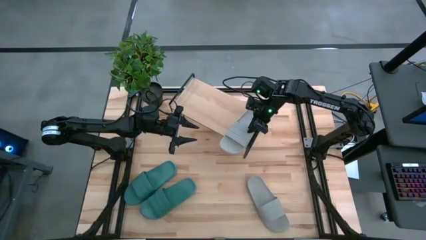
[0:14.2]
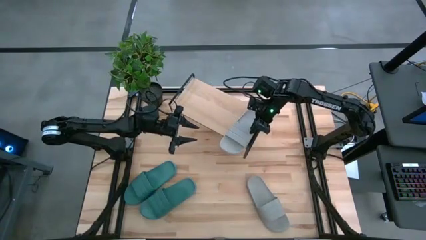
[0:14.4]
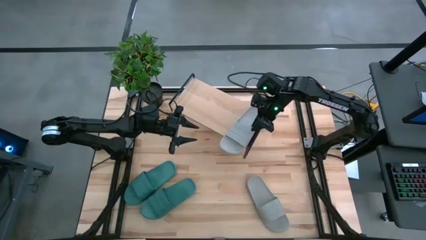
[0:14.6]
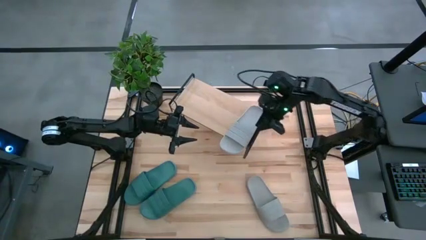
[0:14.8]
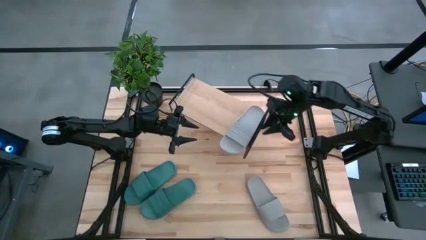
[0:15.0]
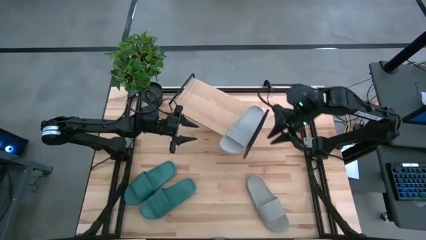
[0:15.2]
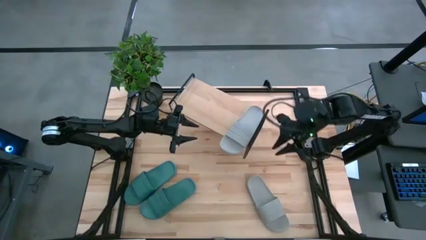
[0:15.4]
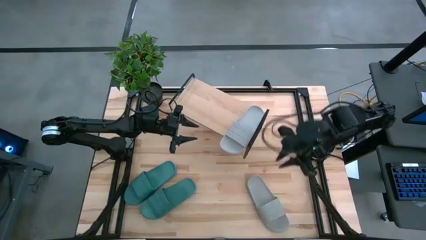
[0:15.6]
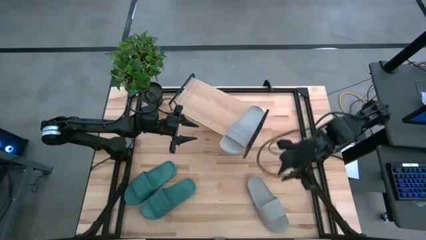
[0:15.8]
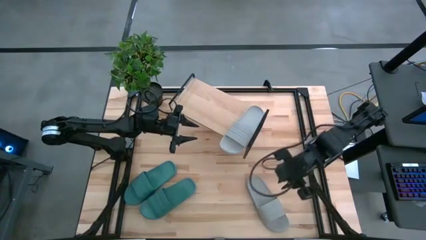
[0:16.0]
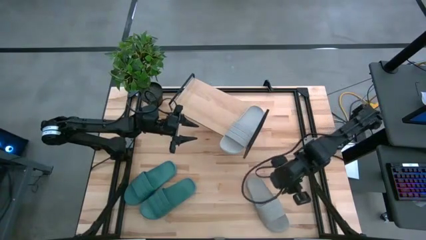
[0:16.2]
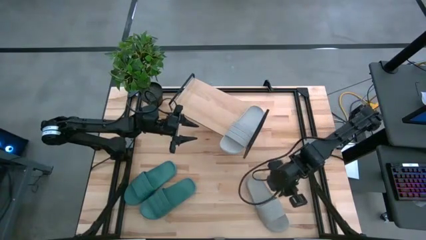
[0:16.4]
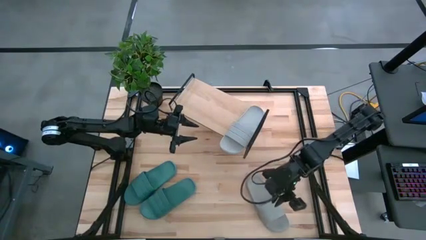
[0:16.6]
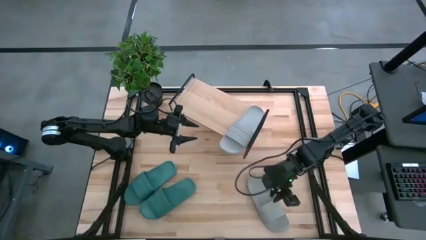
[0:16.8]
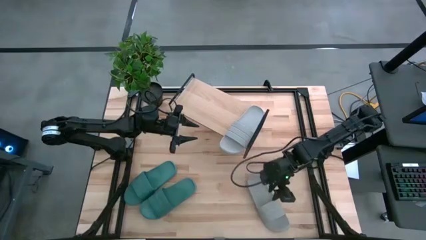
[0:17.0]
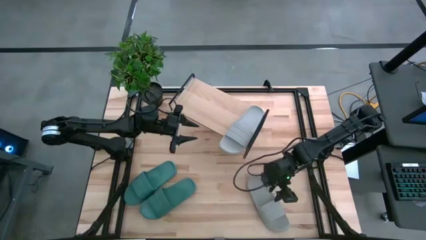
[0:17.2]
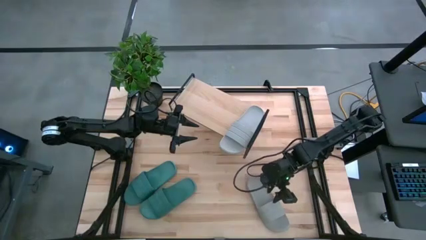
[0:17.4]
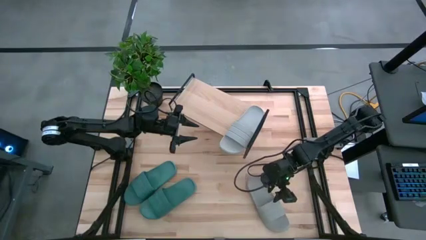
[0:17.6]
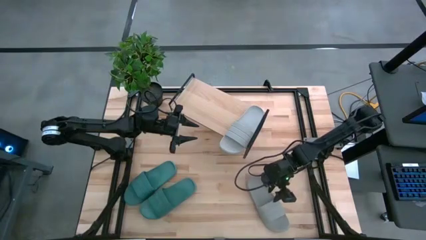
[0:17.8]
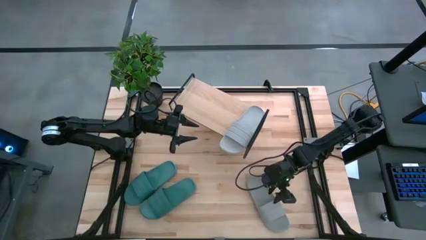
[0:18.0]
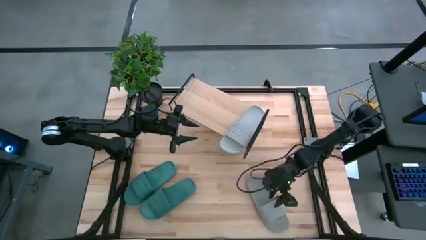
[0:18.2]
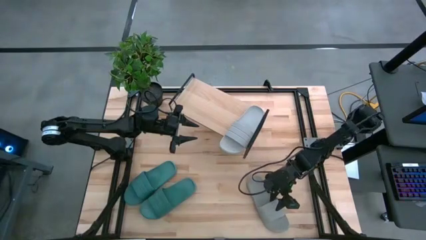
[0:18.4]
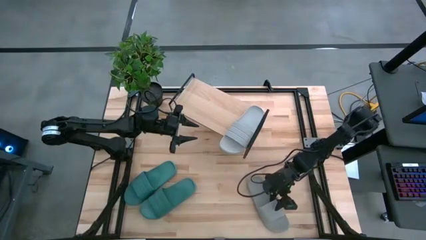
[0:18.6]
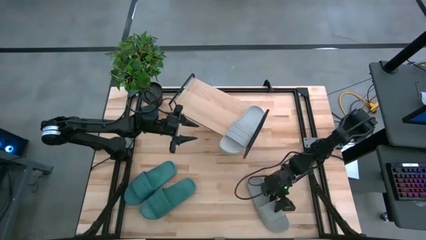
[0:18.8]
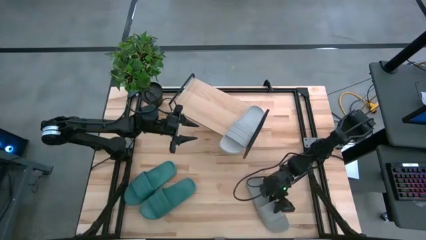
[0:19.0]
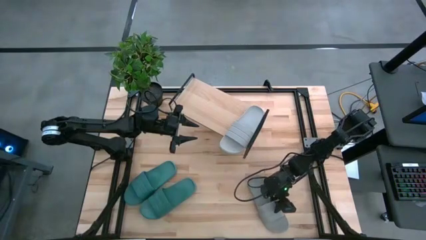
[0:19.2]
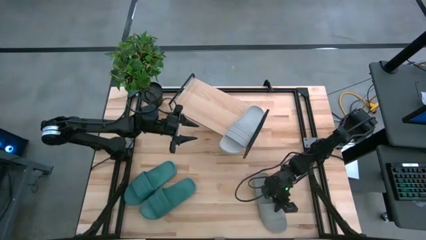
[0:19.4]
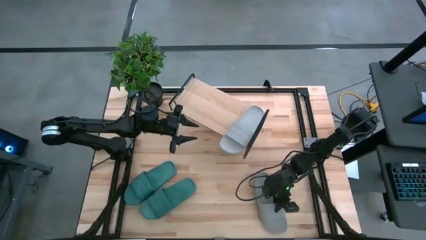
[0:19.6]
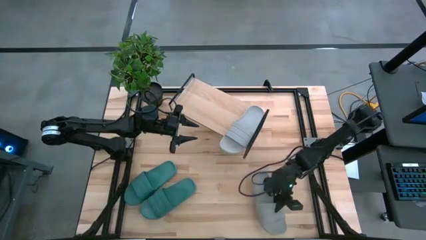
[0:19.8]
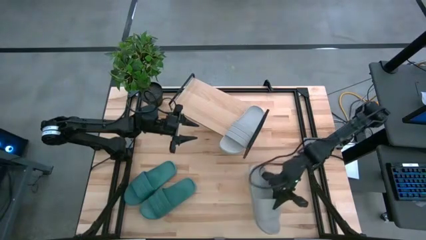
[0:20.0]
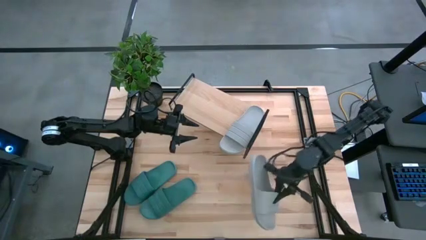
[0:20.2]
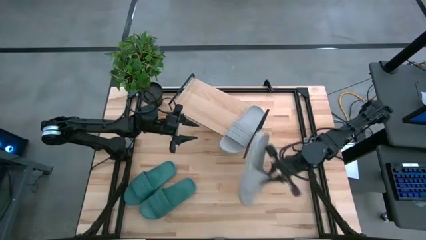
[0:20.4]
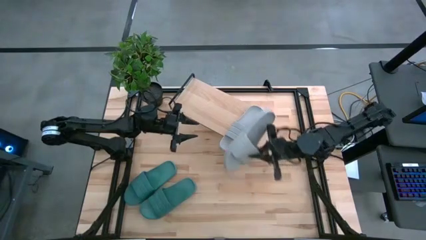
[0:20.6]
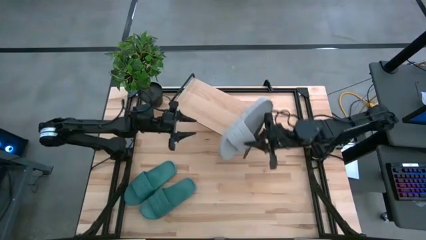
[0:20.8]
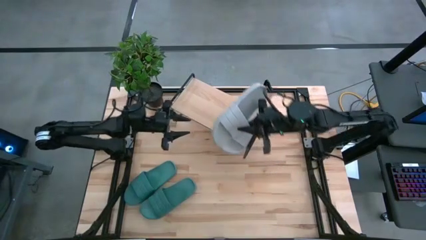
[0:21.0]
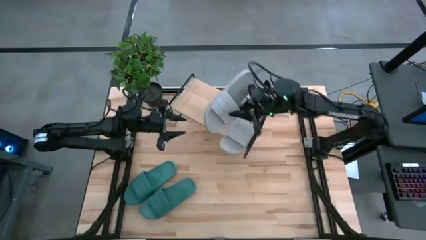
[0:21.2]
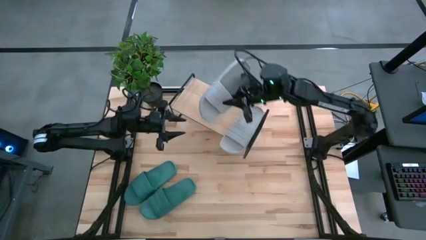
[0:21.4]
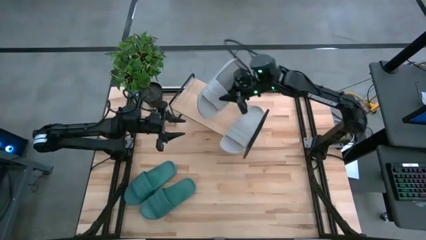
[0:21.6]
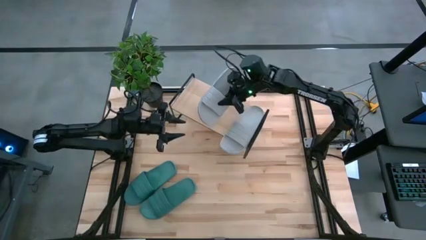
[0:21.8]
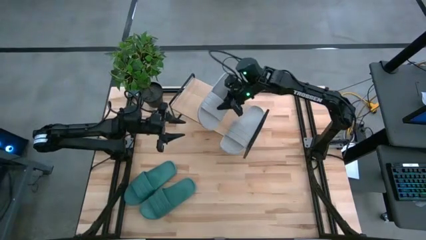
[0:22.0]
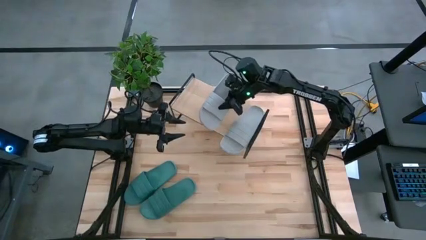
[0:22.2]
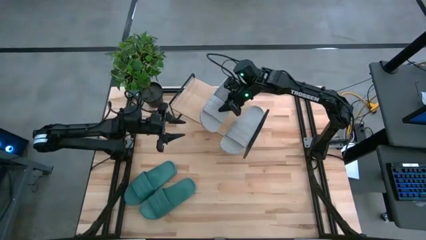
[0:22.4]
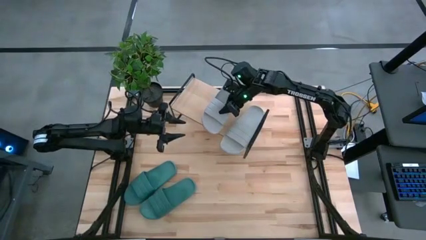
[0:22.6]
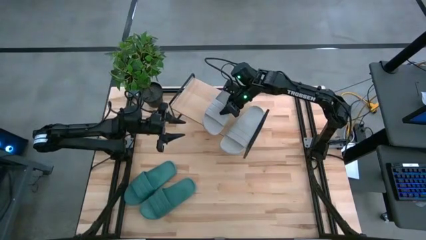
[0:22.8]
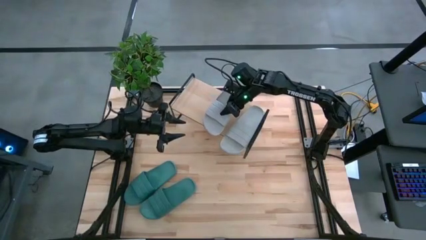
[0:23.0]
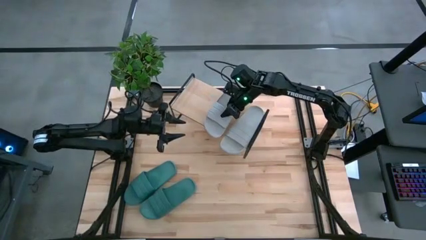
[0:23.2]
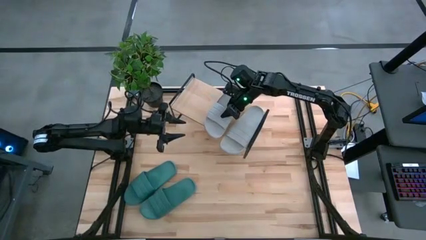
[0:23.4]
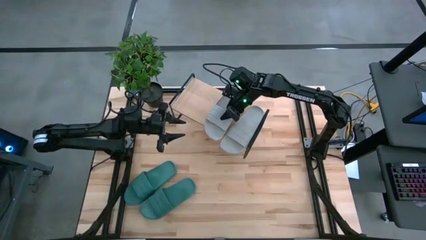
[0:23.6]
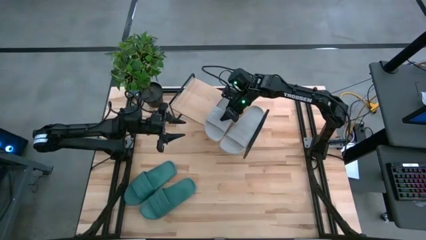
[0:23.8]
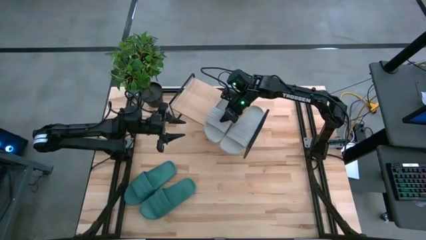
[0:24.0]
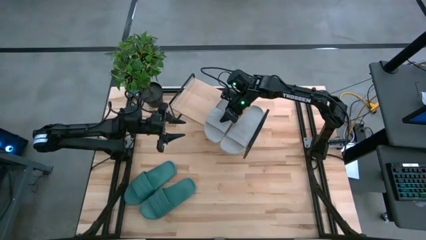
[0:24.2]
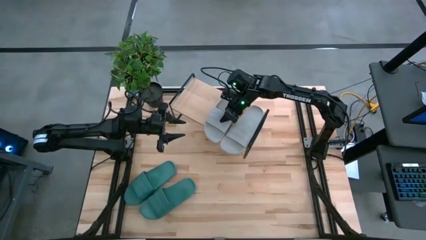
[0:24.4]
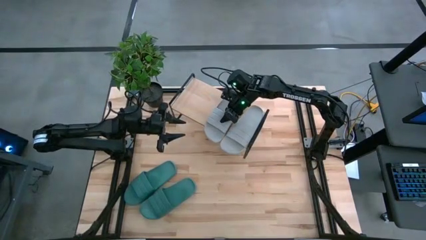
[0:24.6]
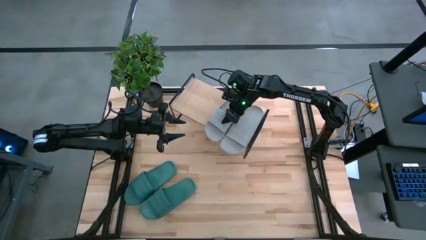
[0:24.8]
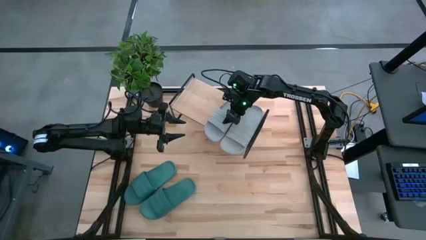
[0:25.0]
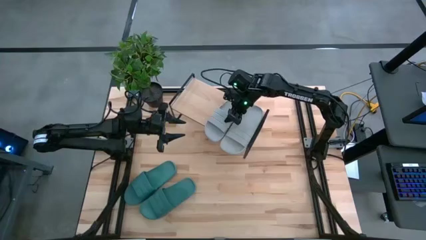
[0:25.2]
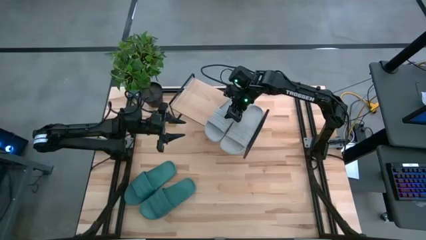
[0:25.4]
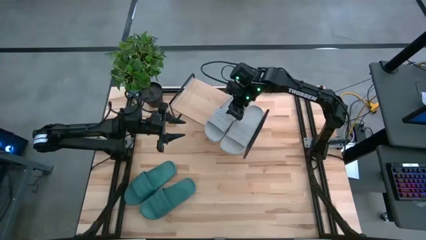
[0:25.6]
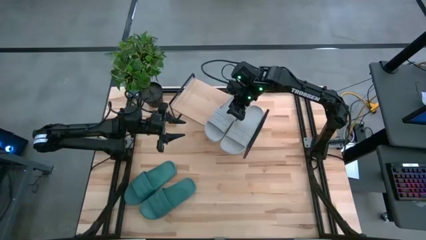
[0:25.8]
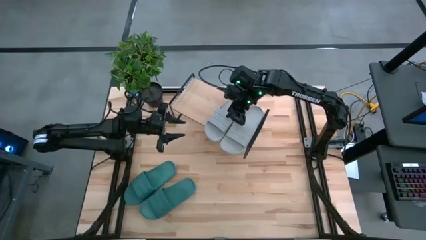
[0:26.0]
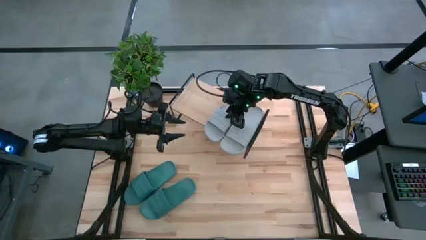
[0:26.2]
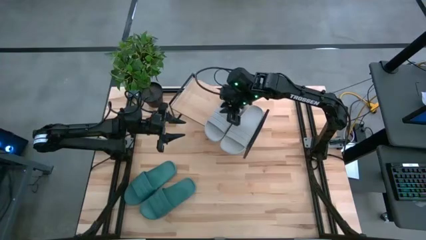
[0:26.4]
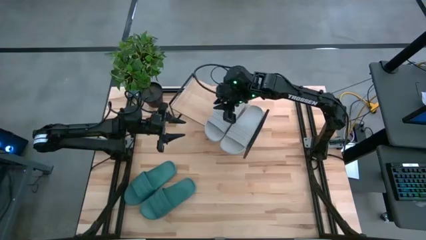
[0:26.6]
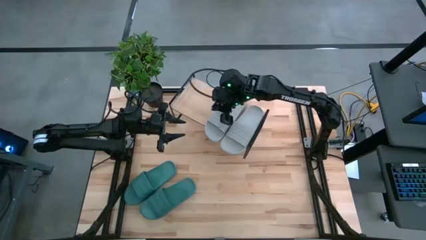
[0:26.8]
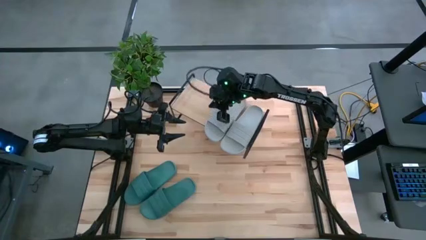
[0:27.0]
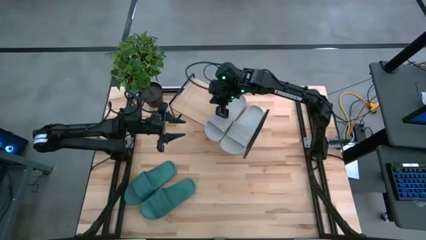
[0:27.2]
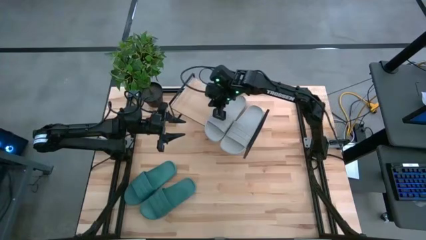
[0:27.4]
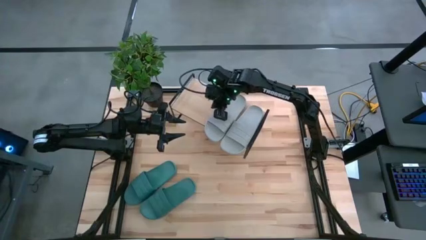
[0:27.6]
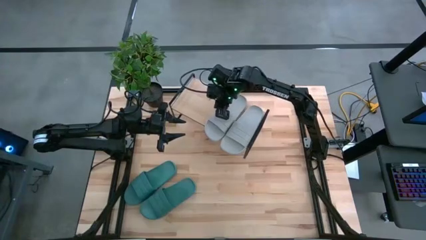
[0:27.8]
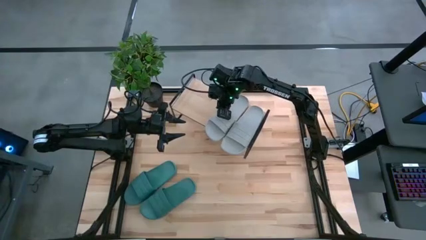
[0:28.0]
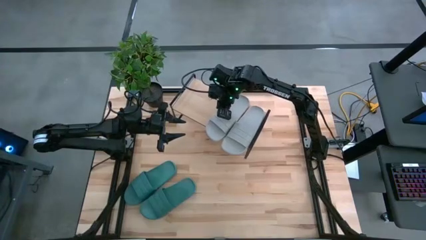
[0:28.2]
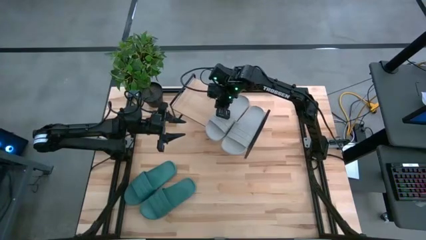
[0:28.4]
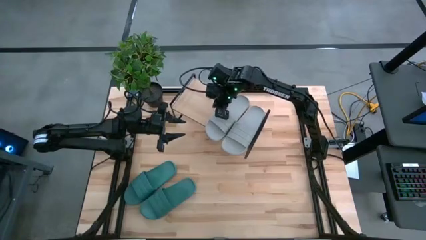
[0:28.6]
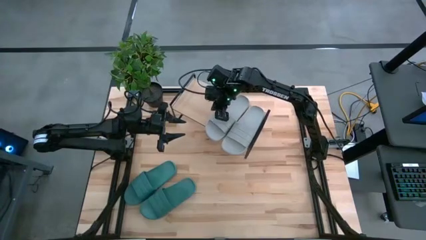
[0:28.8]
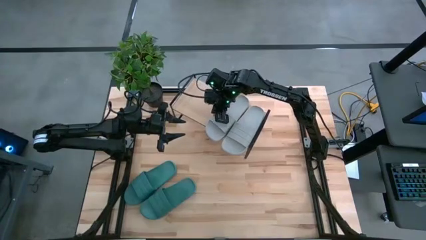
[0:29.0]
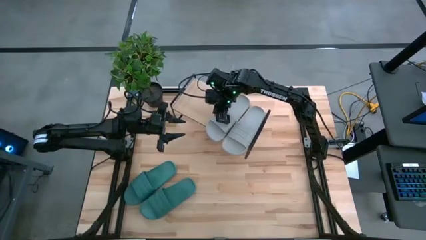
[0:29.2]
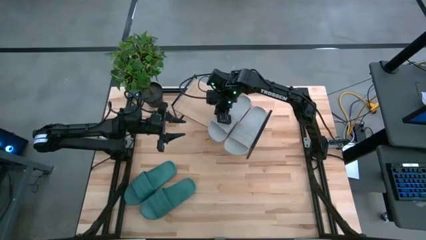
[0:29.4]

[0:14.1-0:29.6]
Task: Pick and place slides into the shelf
Put the gray slide on the shelf
